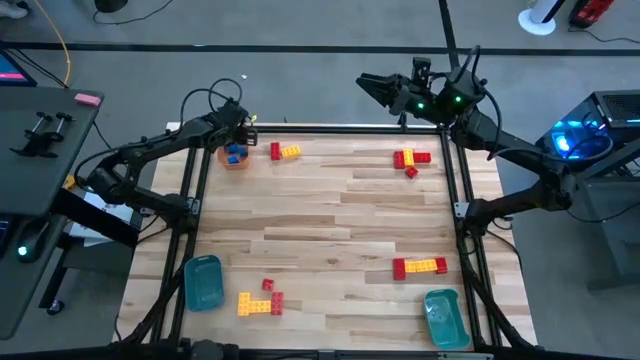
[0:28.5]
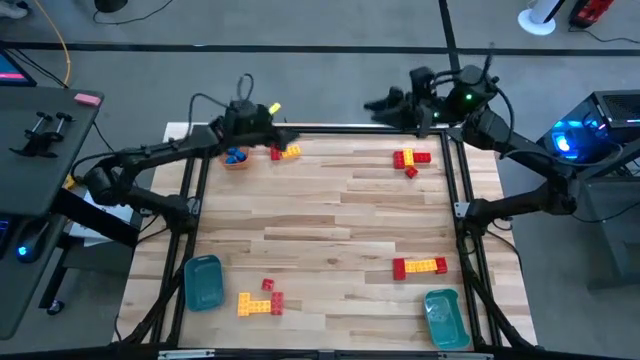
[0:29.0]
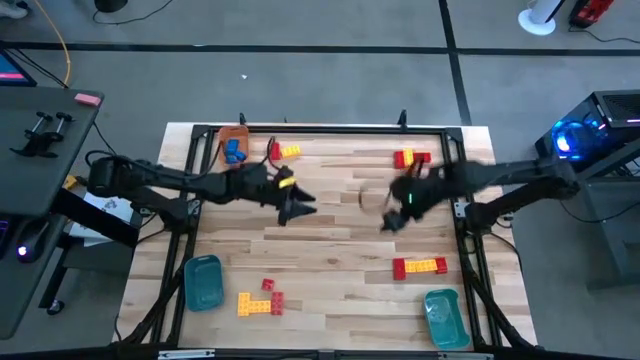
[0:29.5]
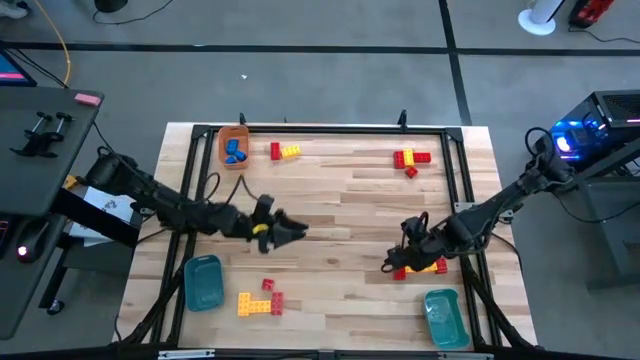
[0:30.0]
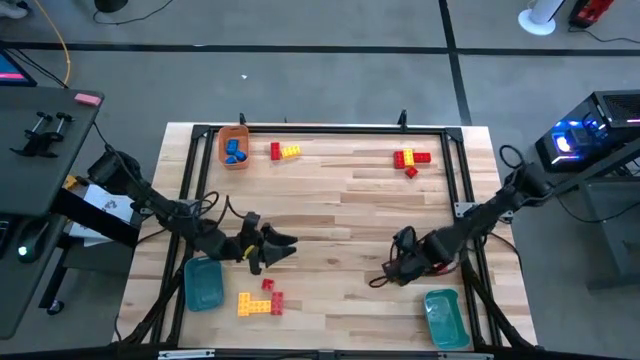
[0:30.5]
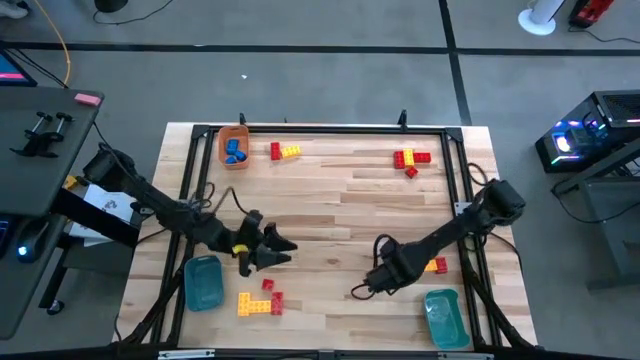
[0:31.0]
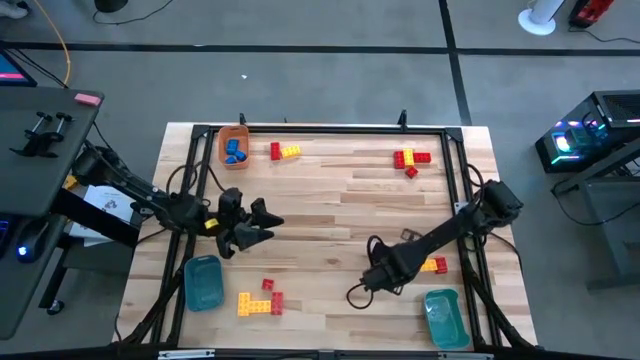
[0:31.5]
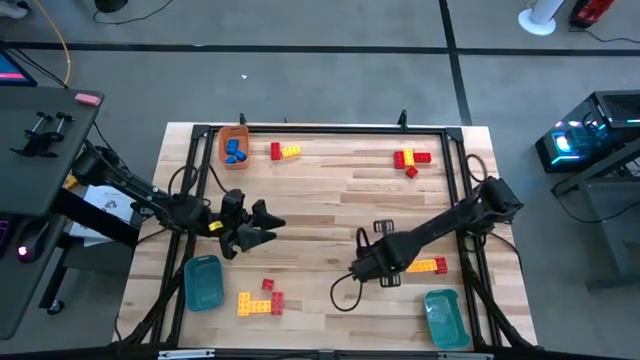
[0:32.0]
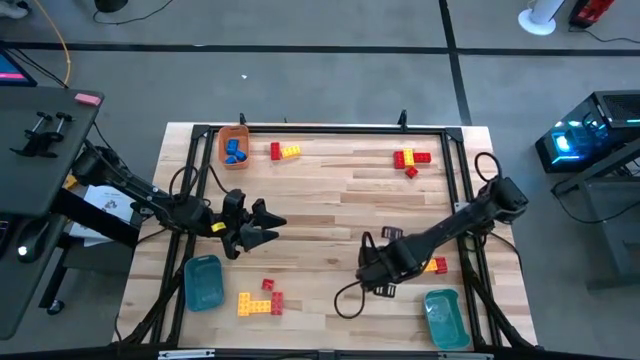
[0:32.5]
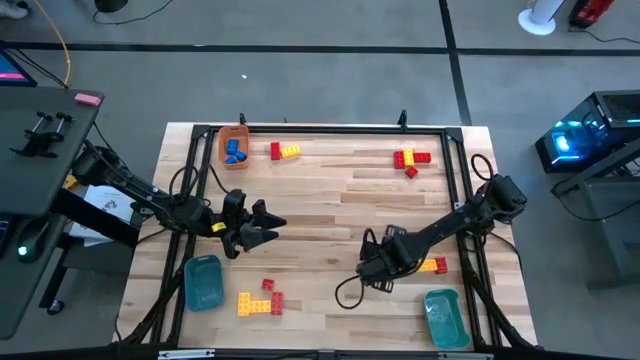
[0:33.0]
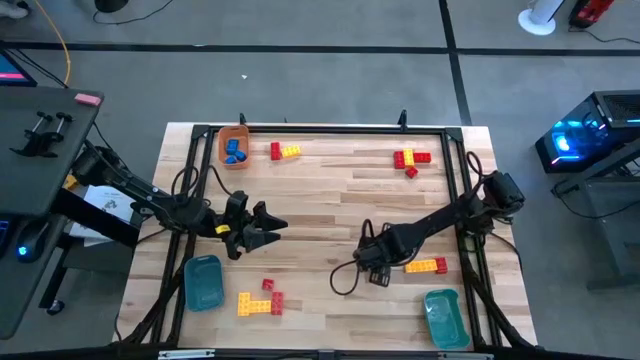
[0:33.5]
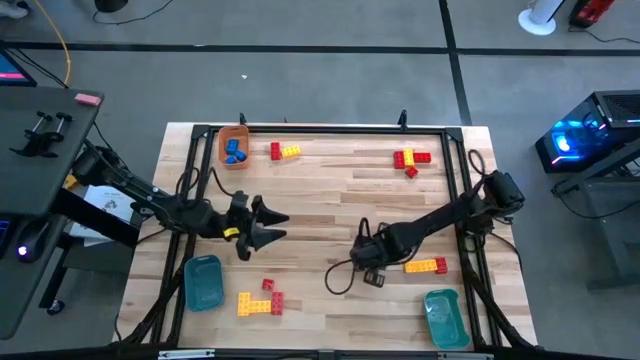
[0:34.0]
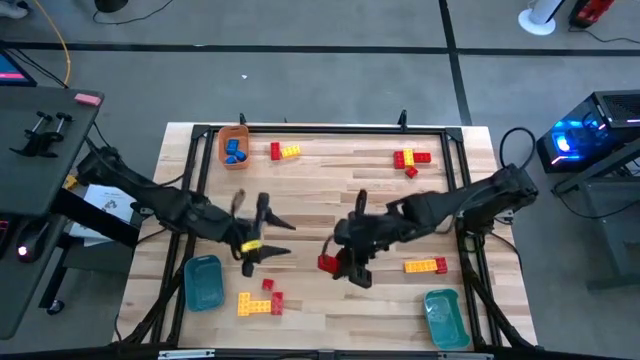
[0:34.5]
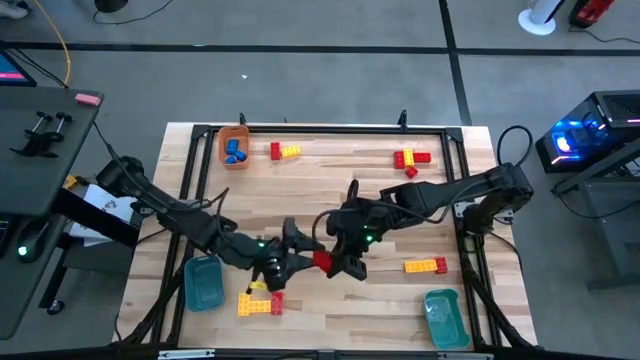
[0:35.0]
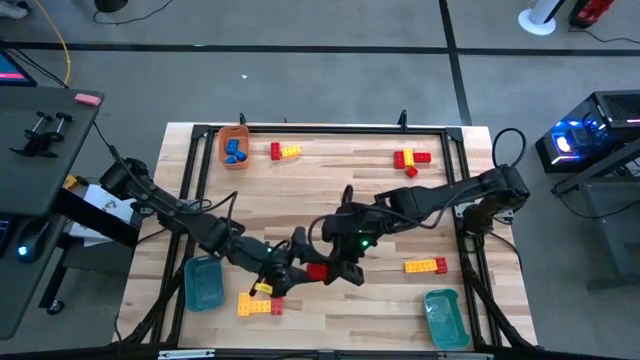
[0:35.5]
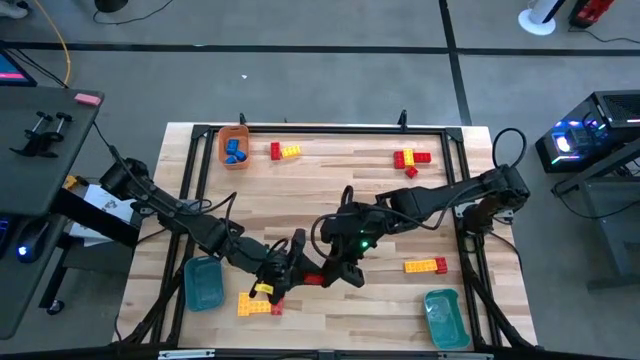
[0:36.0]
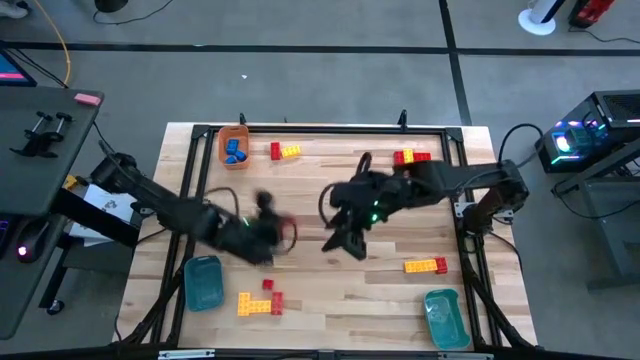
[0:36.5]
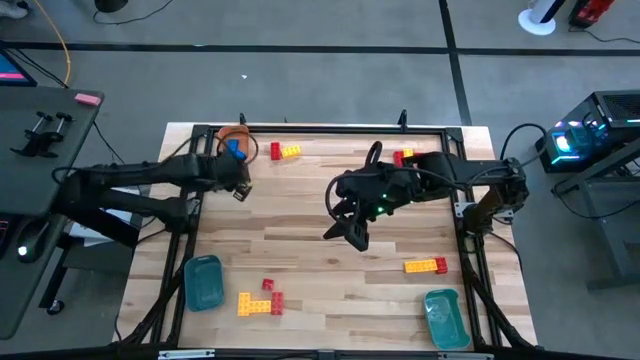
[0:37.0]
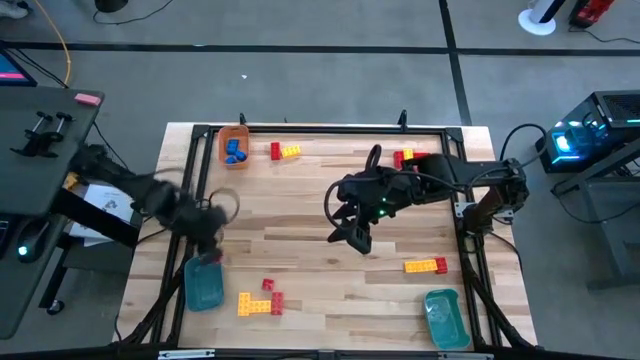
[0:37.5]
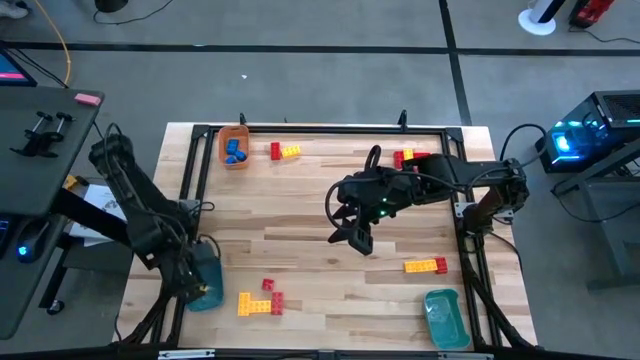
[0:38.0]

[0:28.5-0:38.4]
Task: Sort blocks
Put the red game piece into the bottom left blue bin

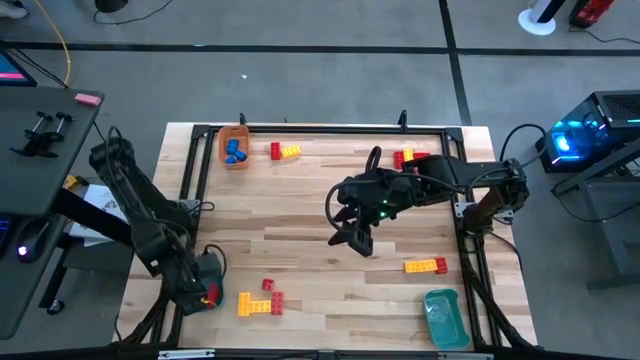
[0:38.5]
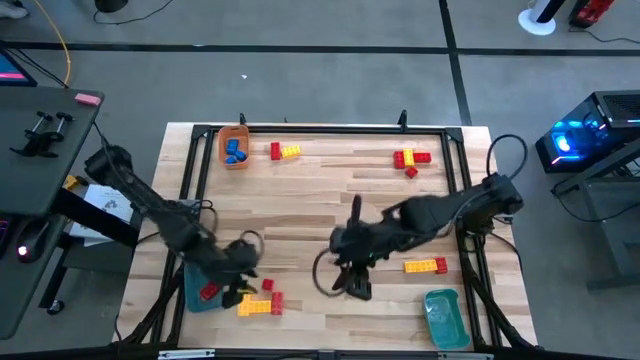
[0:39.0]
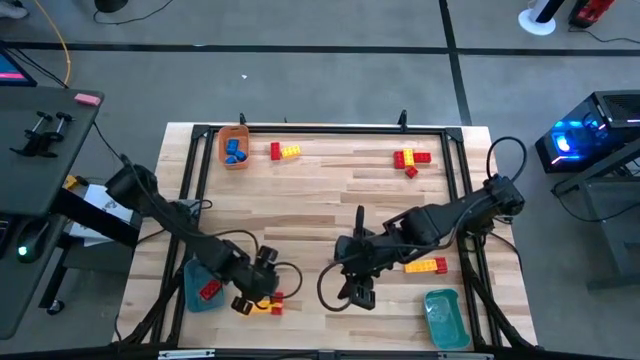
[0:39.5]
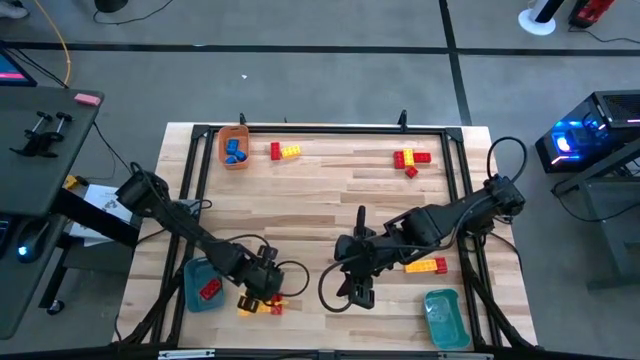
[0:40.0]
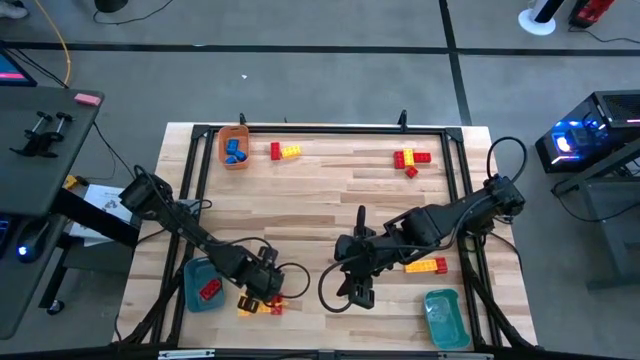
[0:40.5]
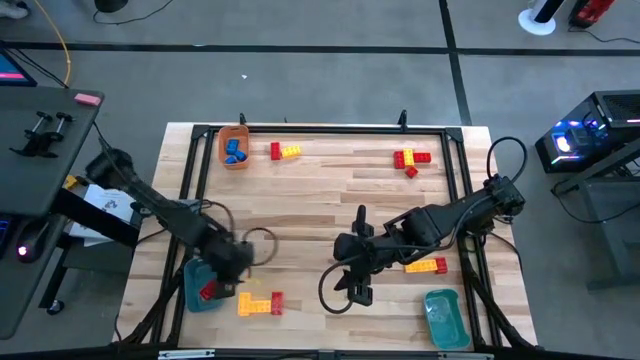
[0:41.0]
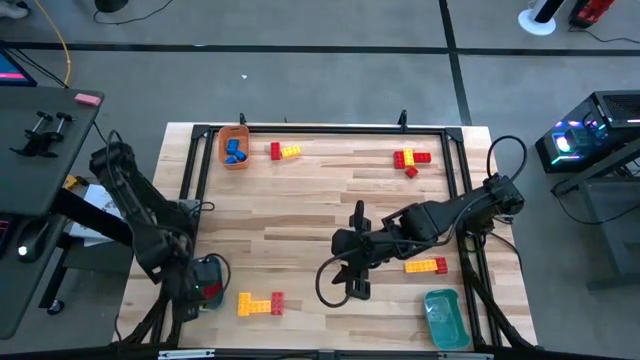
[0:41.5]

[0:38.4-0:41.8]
Put the red game piece into the bottom left blue bin

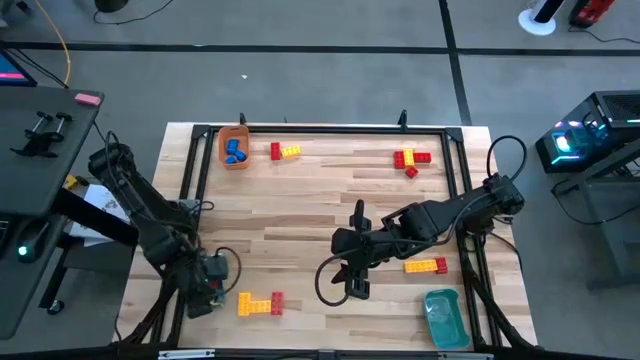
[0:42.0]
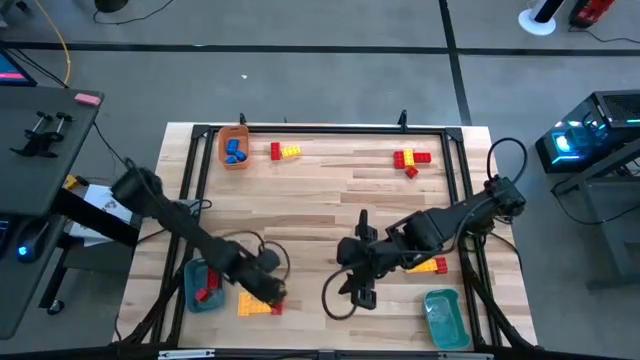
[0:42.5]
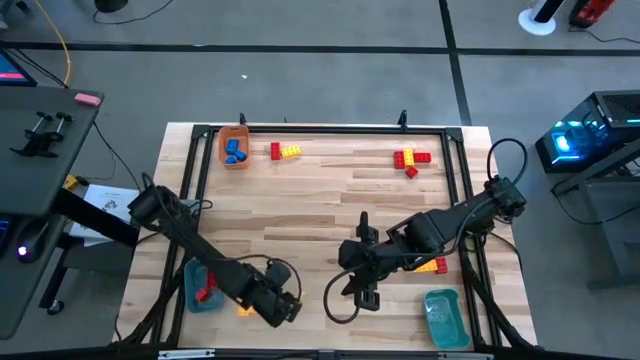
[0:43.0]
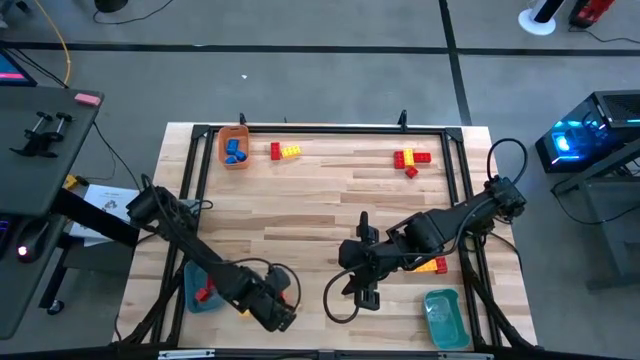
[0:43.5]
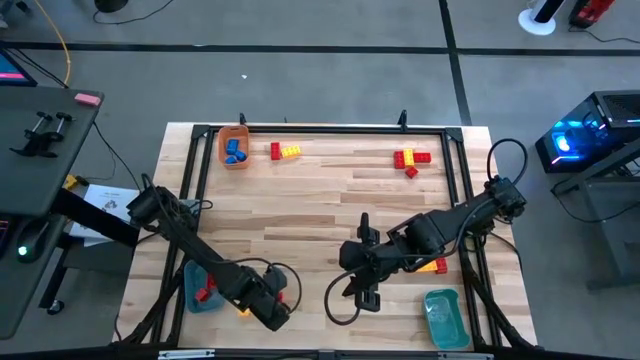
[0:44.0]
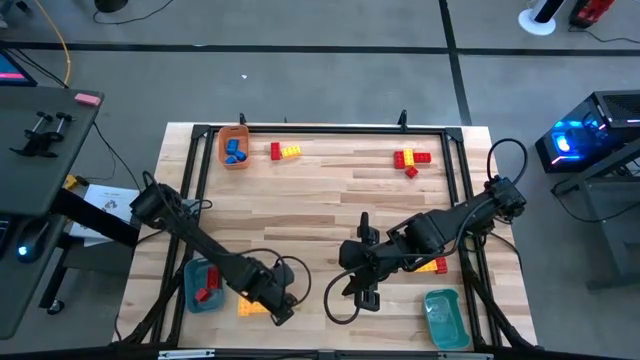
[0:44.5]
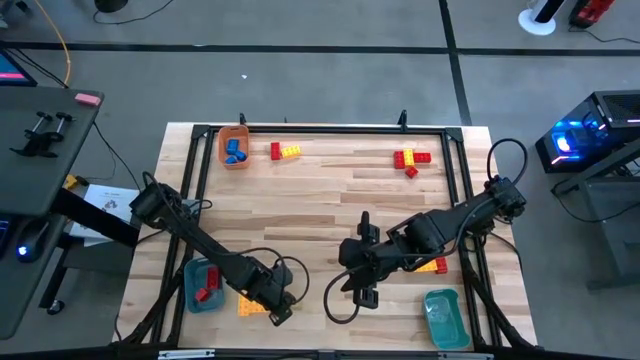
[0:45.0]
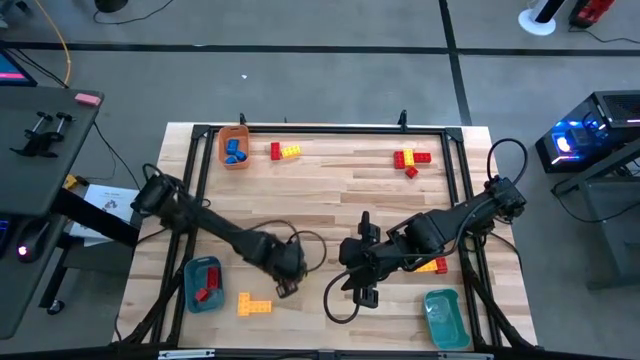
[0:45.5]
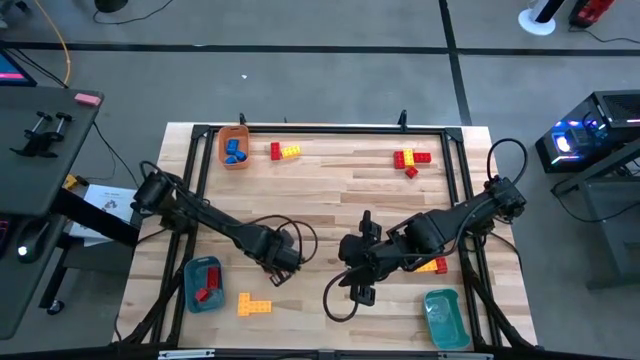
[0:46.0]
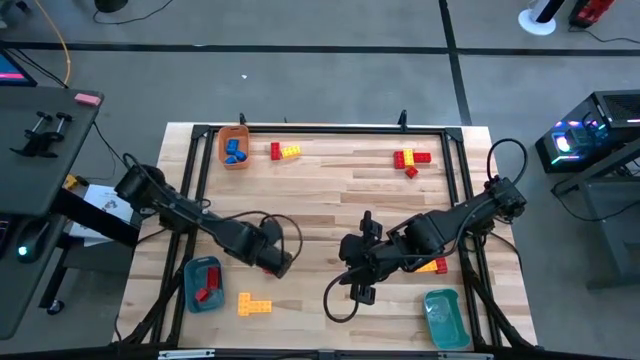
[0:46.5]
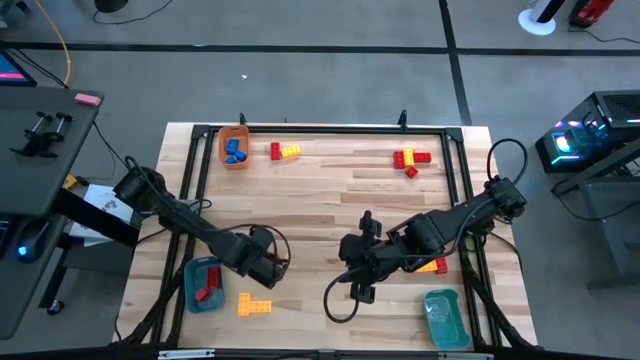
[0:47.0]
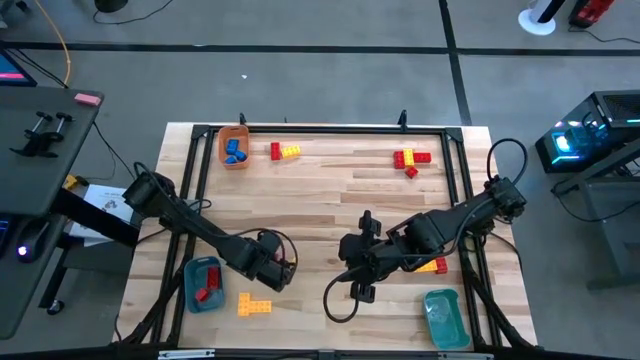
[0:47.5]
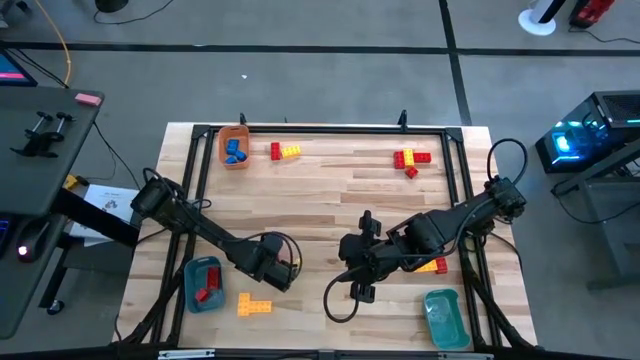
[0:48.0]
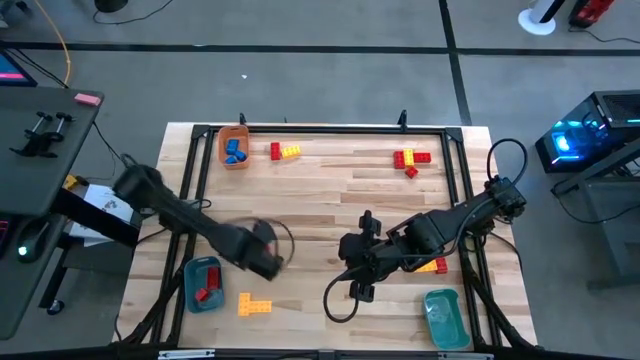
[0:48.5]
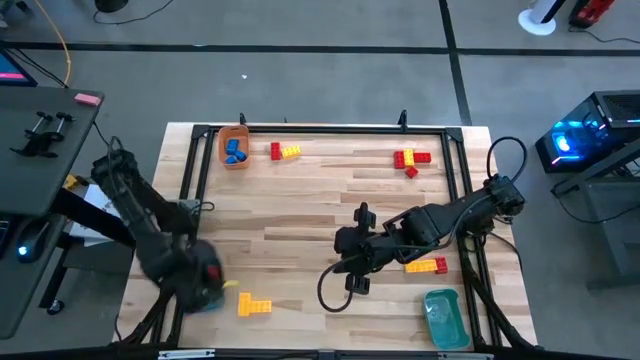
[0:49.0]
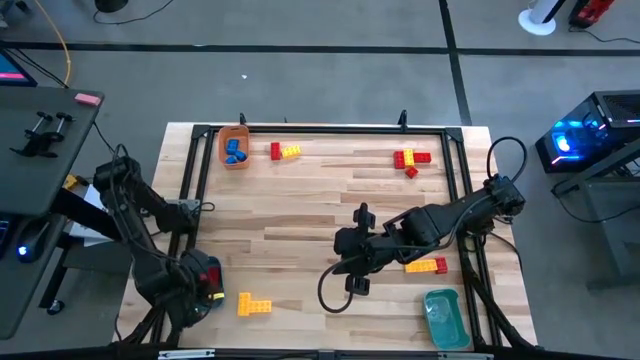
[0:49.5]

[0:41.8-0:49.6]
Put the red game piece into the bottom left blue bin
